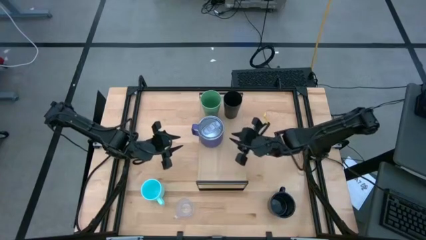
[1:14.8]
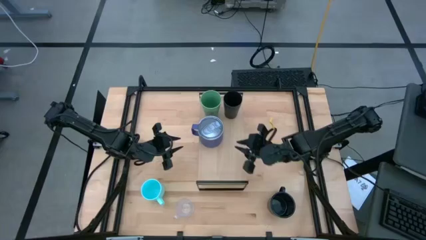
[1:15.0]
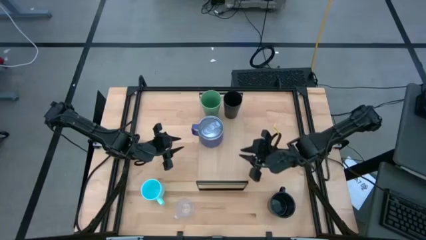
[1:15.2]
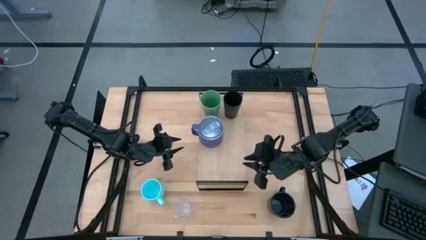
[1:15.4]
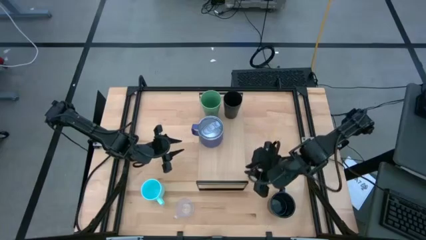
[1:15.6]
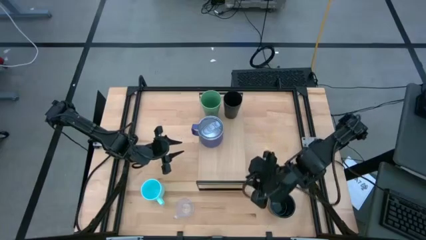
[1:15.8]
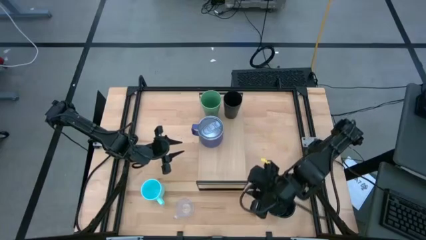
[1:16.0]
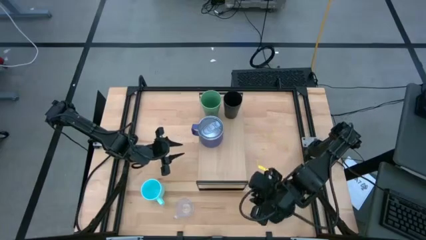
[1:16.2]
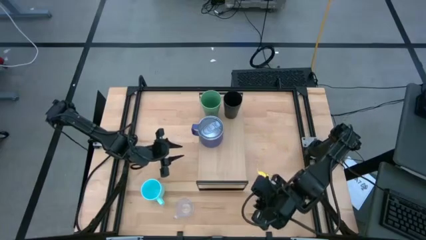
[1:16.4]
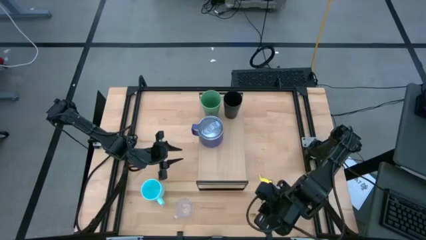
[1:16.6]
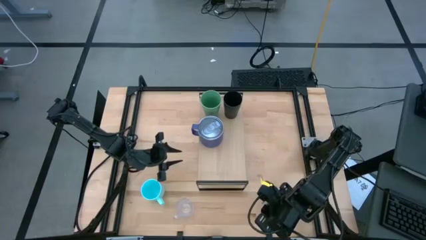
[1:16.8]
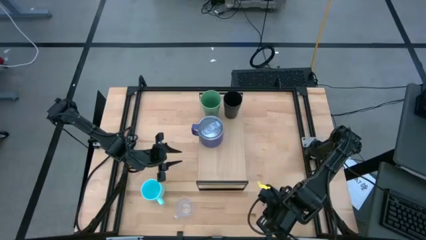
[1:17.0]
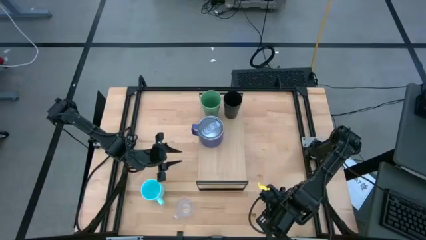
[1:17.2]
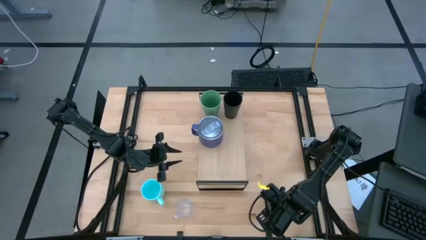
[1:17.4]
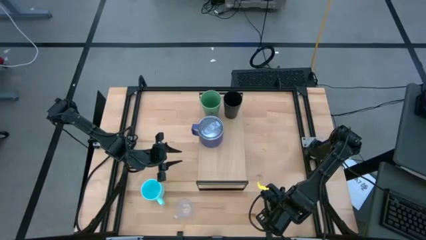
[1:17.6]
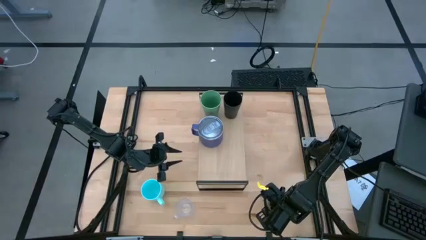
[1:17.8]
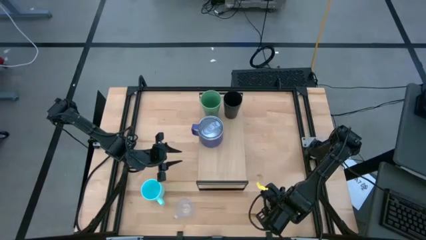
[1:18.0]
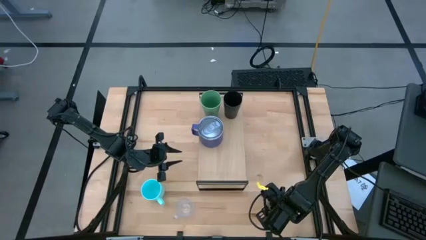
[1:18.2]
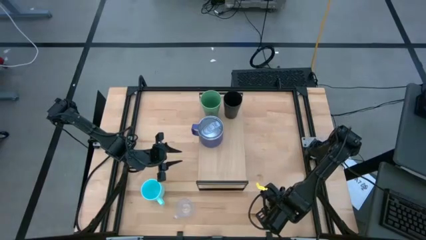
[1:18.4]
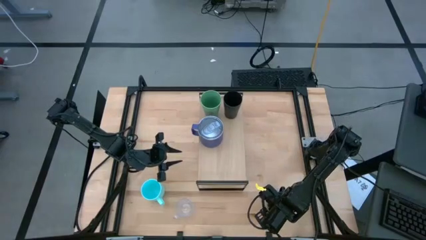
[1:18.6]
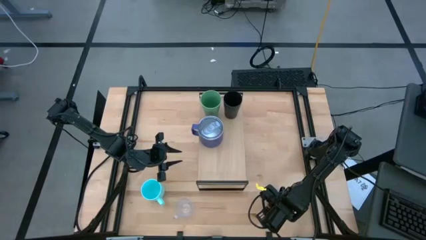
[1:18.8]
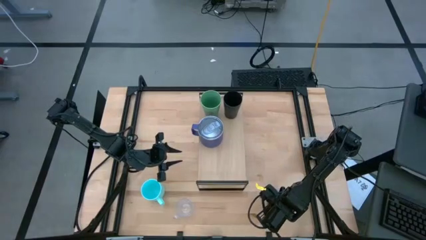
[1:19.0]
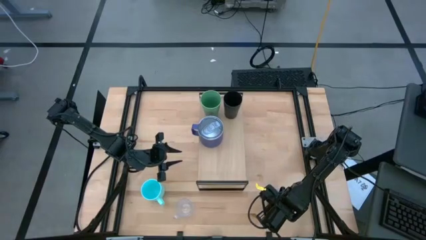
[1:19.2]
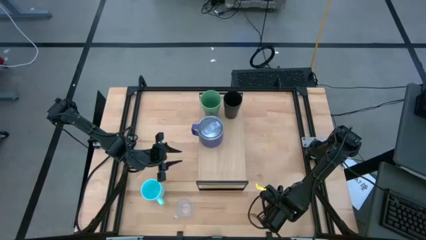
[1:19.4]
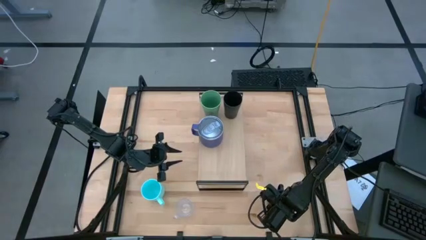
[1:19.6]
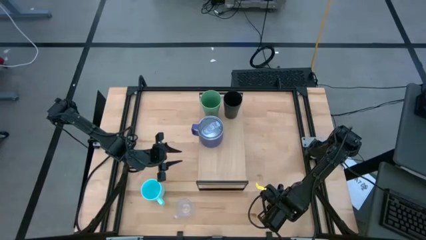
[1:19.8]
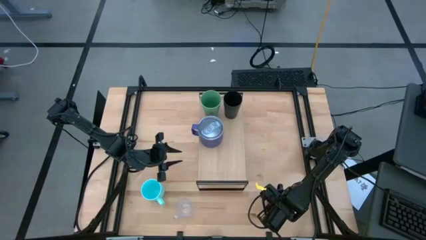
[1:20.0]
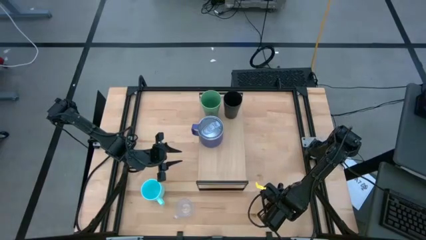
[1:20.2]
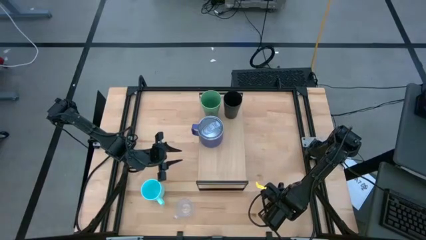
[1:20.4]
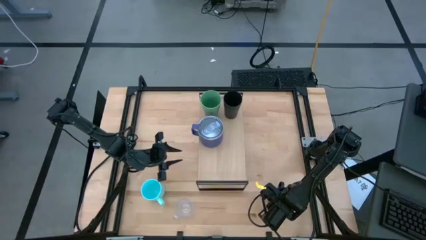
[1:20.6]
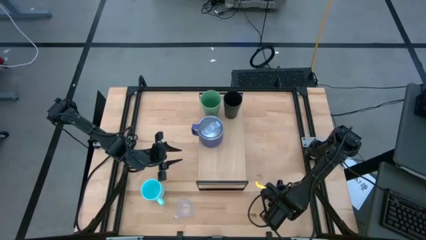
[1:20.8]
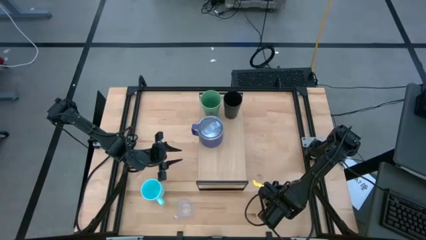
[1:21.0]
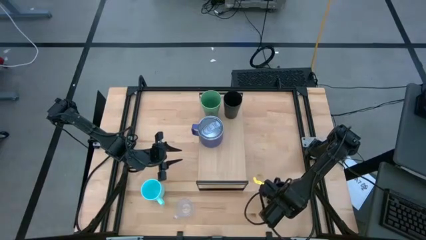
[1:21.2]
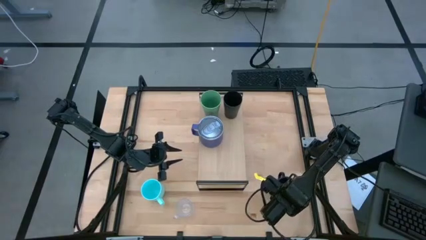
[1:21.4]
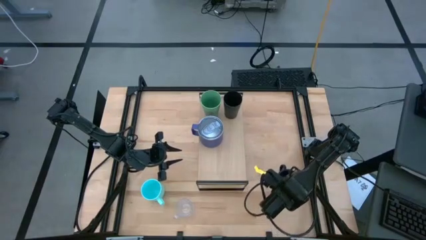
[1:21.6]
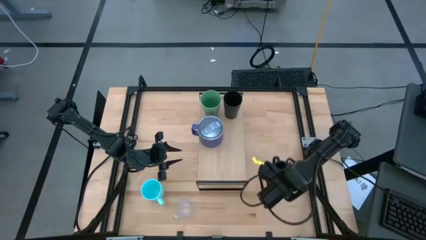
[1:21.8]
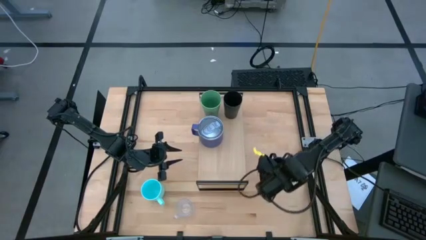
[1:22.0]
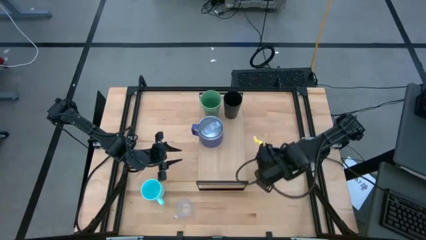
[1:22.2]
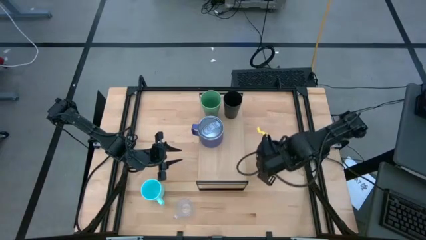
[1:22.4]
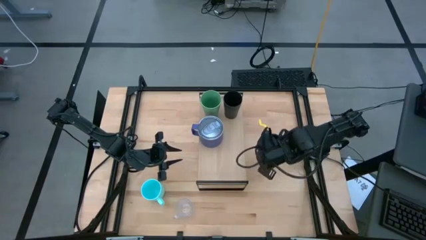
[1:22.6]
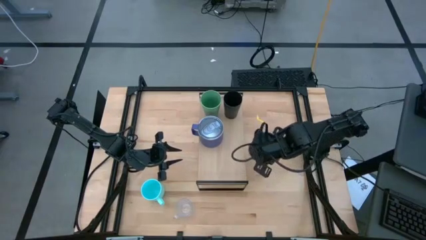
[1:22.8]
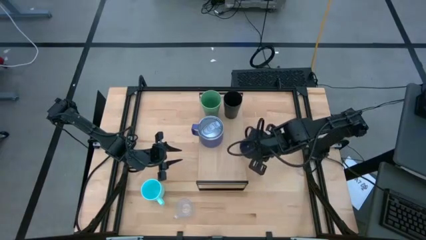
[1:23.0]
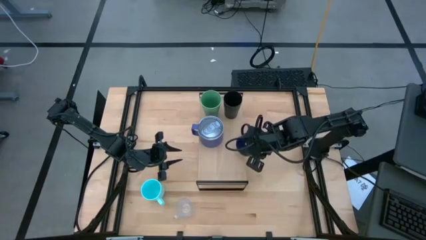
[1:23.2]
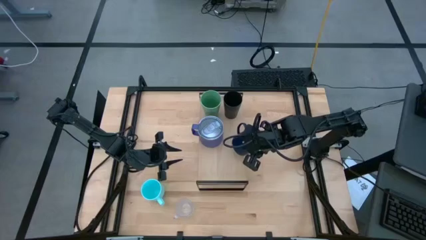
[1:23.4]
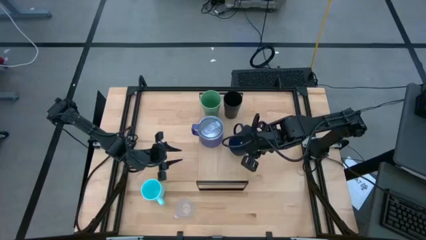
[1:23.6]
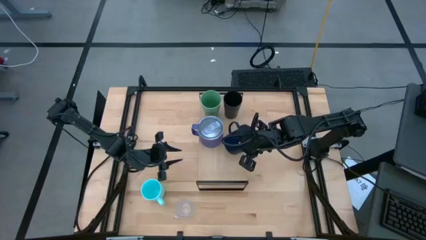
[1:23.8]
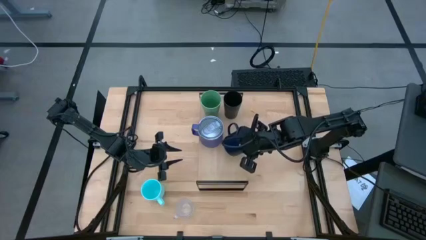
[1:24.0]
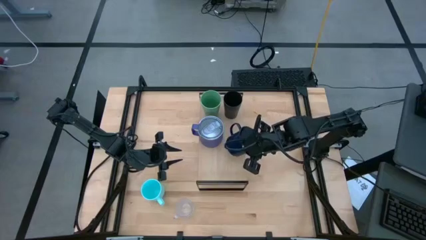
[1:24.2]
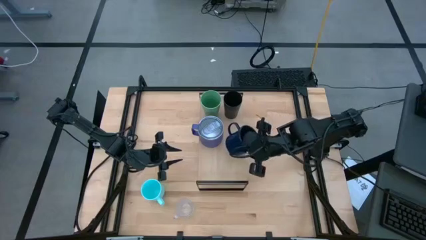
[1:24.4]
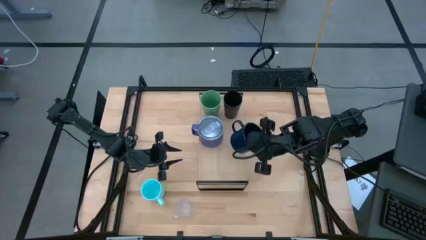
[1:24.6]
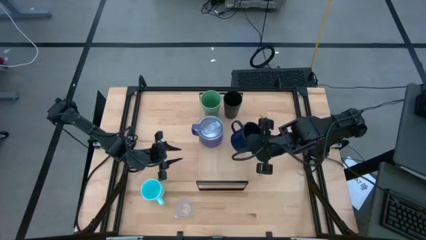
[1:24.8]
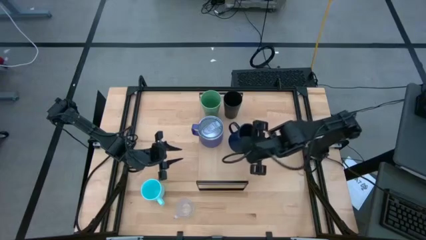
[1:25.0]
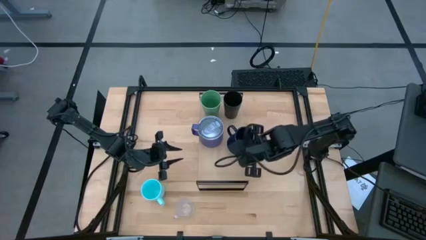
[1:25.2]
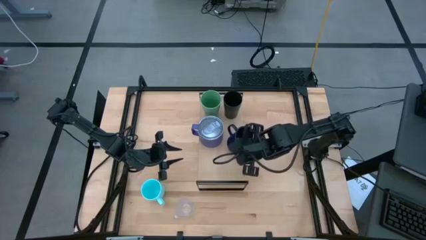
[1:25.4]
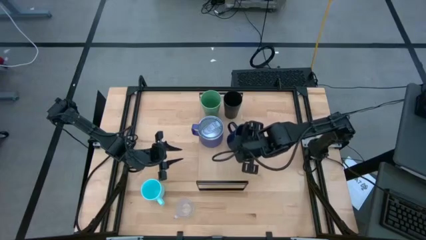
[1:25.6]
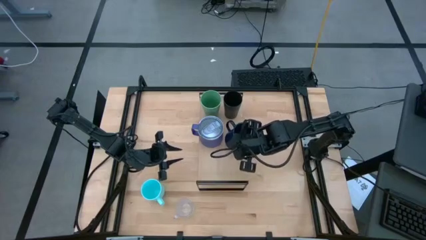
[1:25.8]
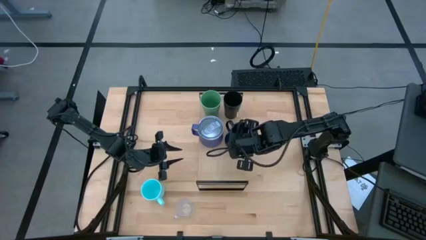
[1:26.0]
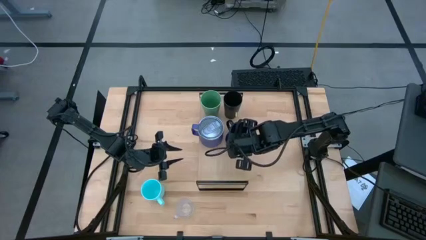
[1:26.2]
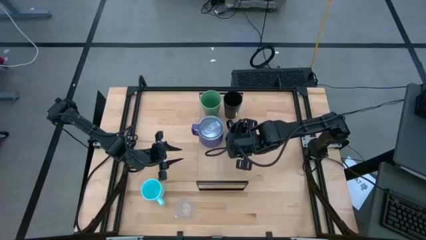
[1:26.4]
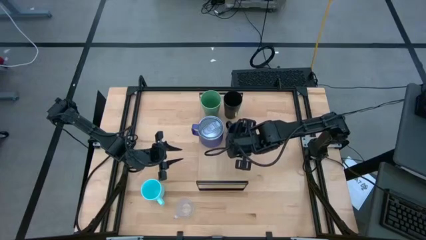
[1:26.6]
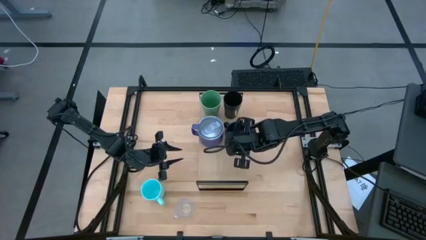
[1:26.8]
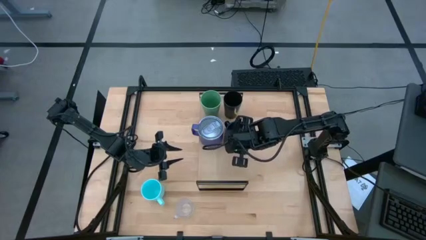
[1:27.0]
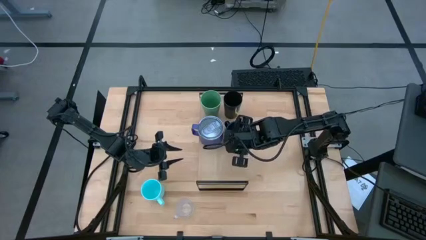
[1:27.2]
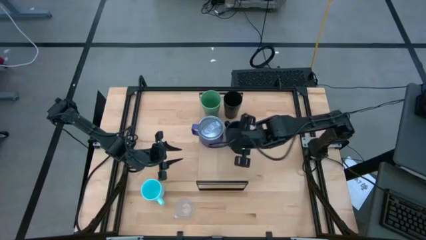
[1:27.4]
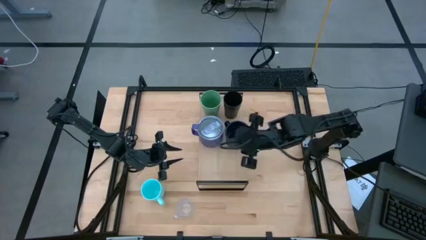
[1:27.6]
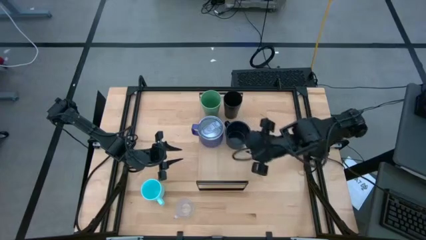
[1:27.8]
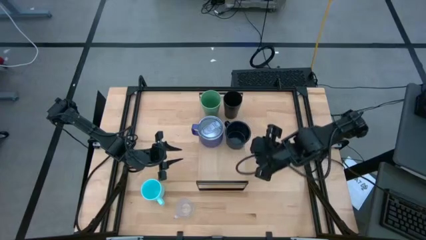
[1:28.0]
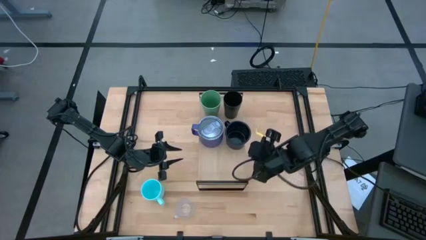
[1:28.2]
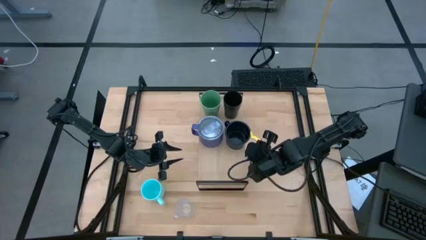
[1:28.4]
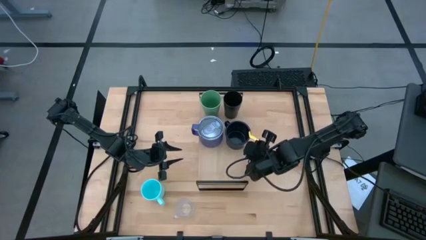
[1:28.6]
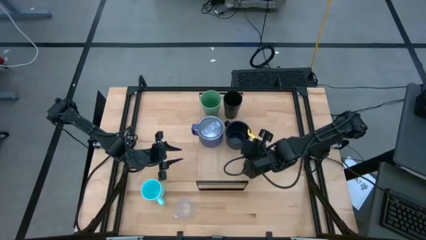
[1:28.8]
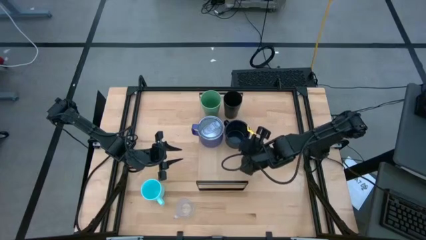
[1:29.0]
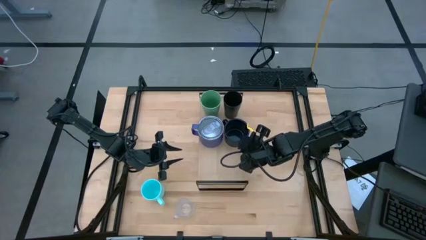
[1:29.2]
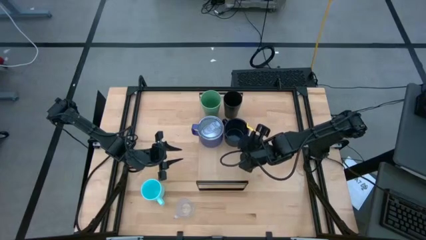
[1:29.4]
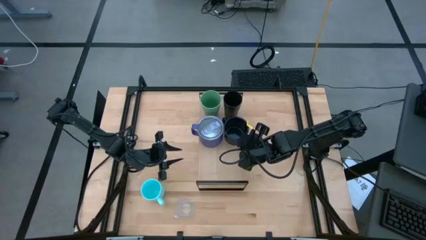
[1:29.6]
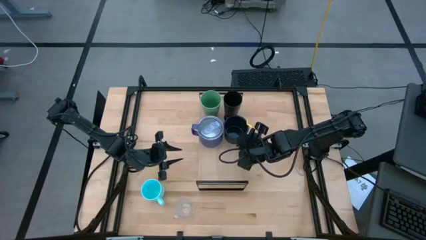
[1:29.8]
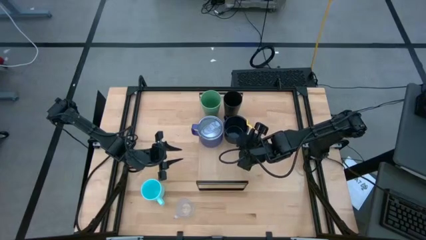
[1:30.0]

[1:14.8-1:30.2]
Task: Stack small to large cups/mugs on shelf
Put the black mug on the shelf

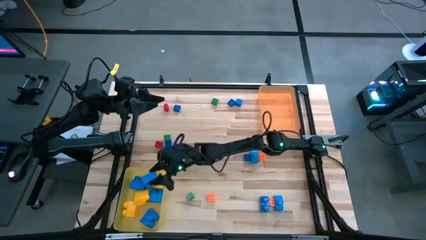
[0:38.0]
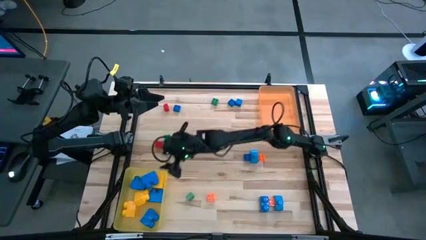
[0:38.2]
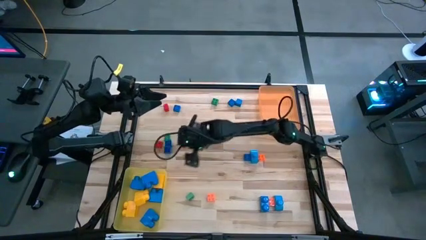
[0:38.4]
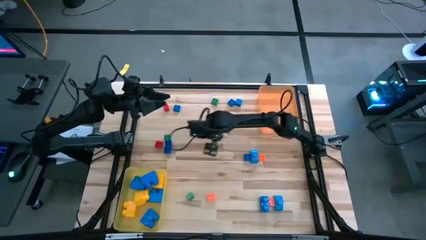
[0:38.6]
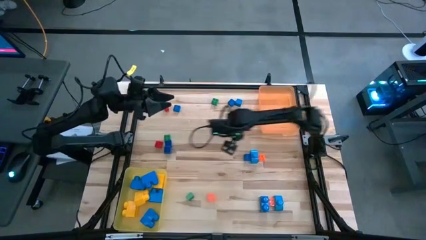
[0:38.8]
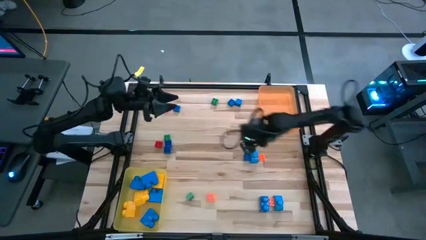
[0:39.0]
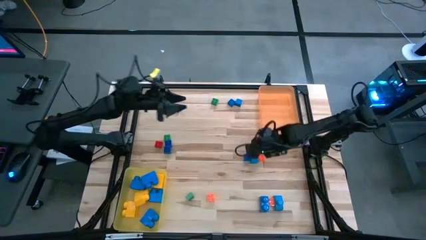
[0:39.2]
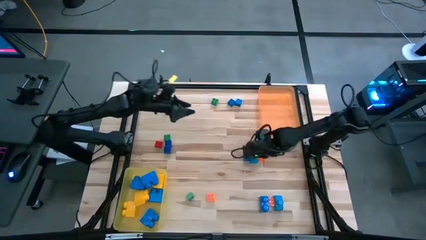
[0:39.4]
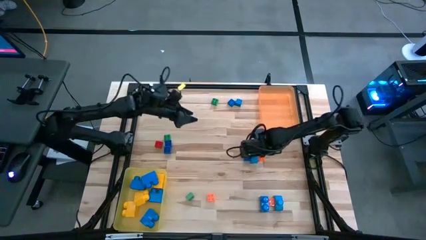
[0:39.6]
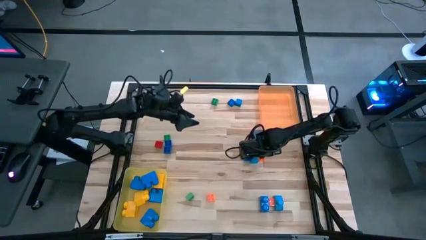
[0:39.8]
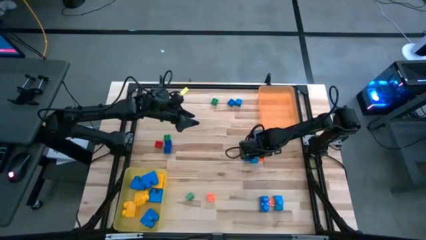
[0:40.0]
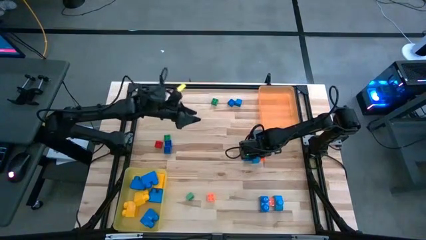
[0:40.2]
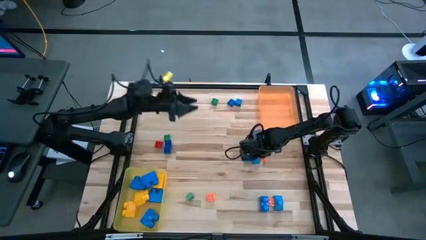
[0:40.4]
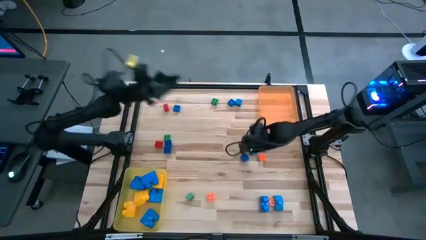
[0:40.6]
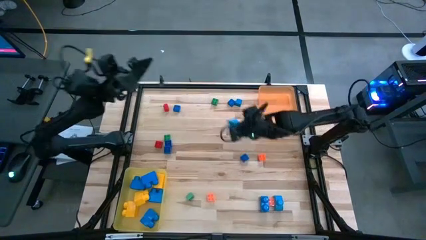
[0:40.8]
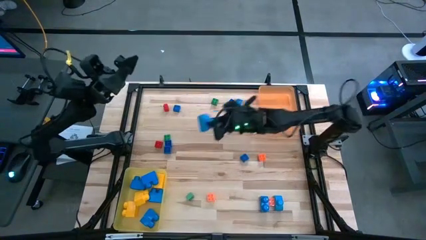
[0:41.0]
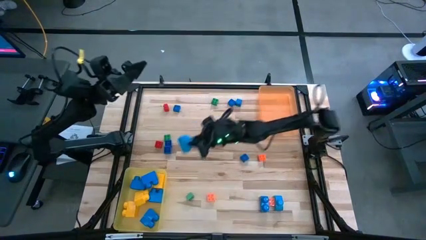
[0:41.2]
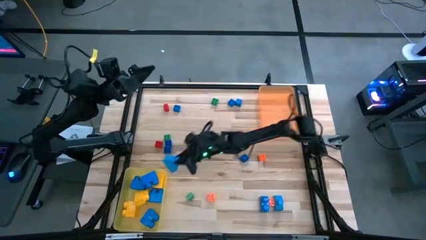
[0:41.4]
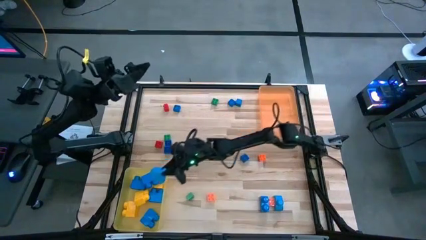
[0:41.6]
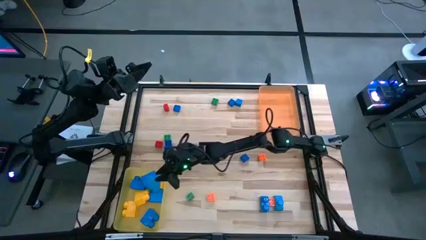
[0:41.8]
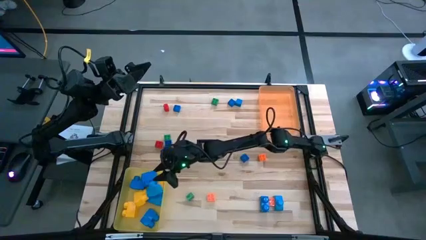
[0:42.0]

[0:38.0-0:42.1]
Task: Sort blocks by size
Put the large blue game piece into the yellow bin
